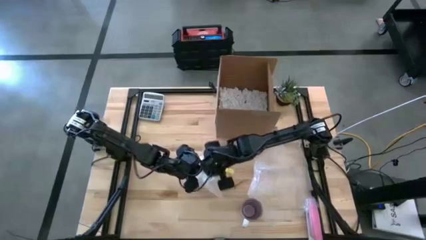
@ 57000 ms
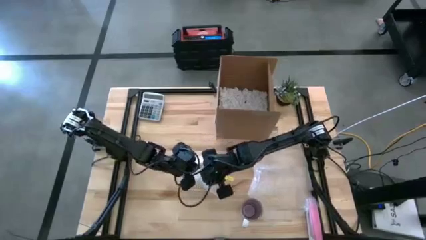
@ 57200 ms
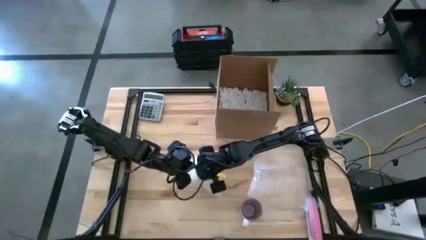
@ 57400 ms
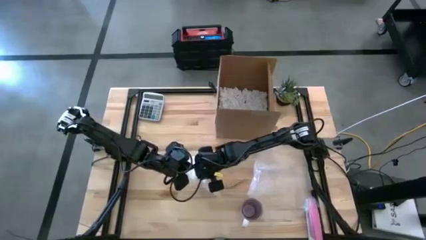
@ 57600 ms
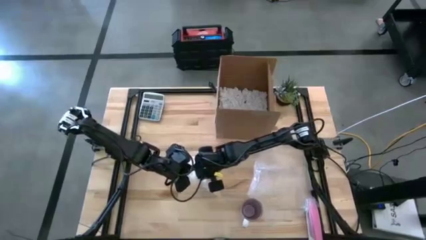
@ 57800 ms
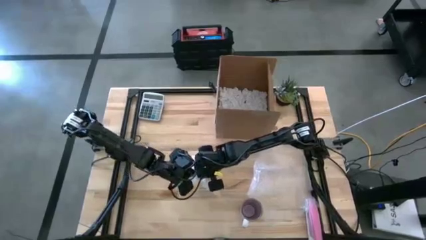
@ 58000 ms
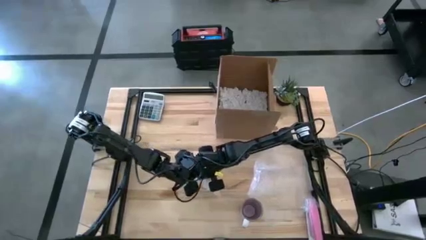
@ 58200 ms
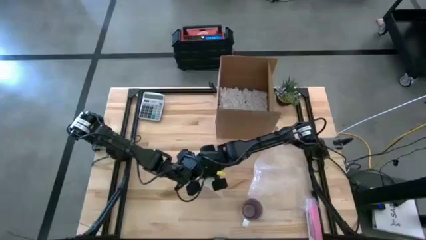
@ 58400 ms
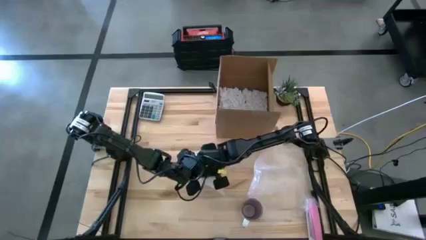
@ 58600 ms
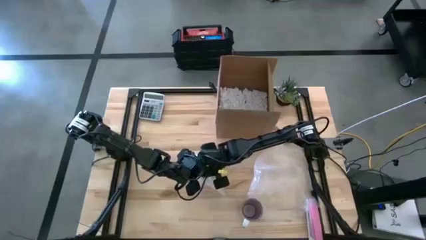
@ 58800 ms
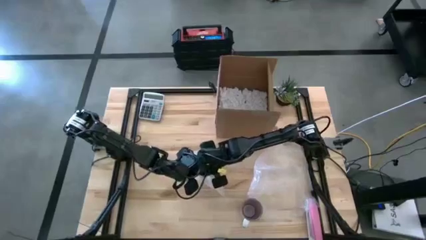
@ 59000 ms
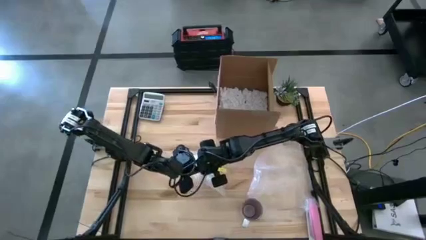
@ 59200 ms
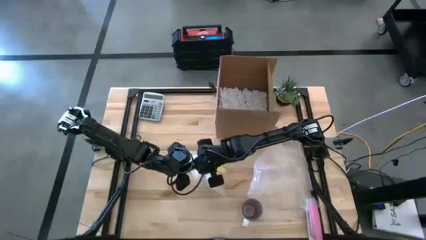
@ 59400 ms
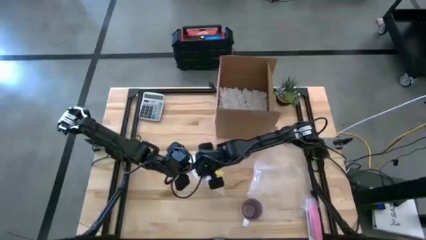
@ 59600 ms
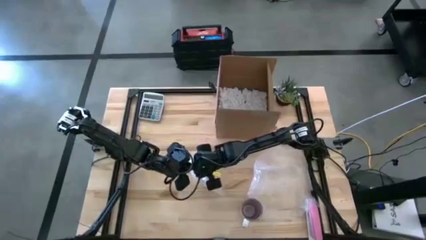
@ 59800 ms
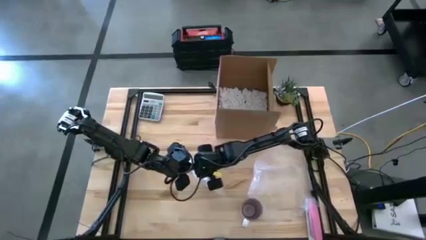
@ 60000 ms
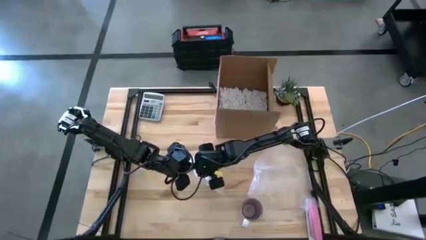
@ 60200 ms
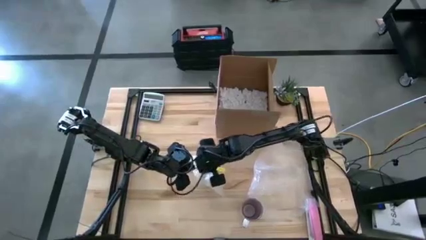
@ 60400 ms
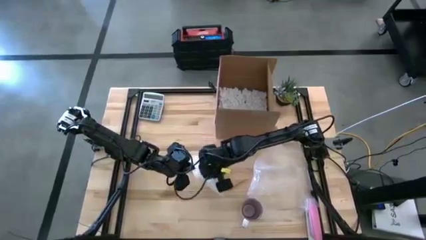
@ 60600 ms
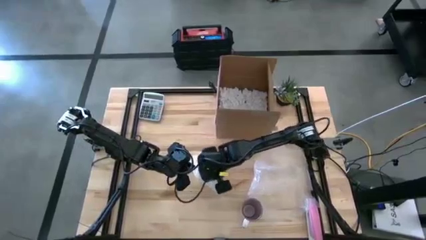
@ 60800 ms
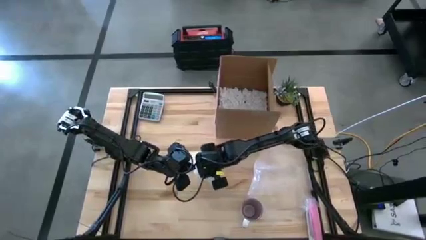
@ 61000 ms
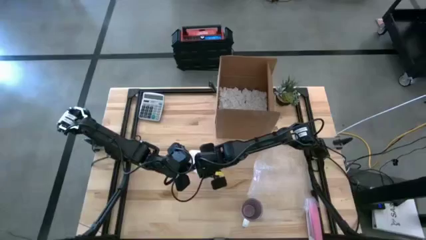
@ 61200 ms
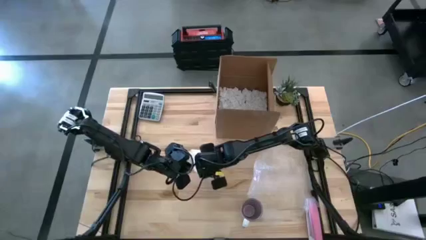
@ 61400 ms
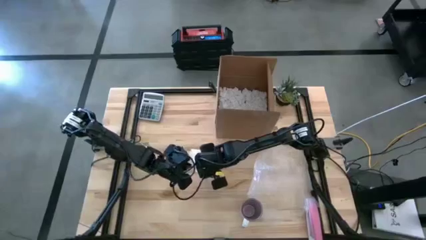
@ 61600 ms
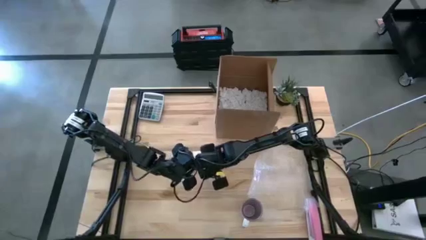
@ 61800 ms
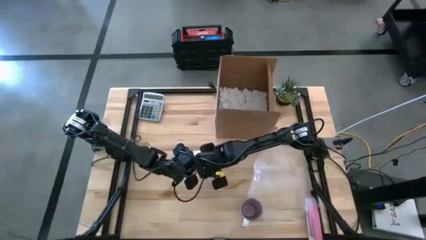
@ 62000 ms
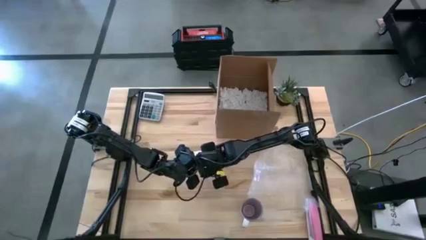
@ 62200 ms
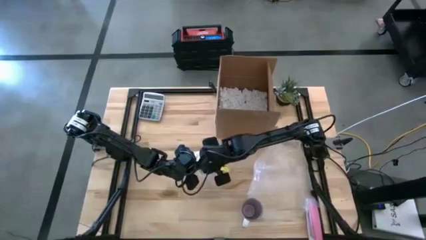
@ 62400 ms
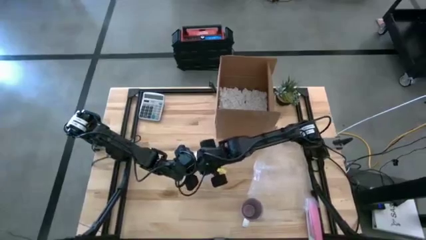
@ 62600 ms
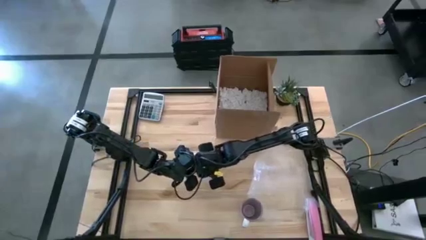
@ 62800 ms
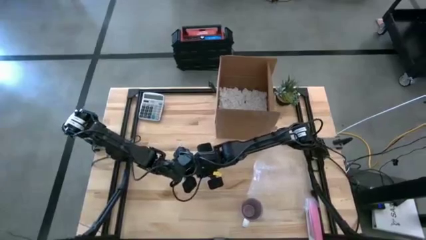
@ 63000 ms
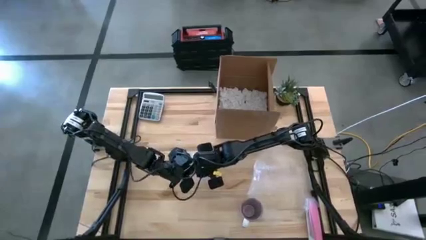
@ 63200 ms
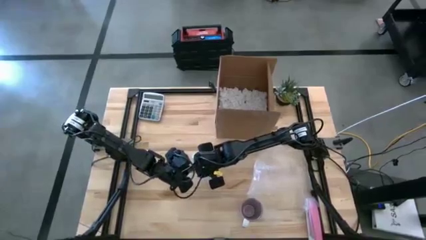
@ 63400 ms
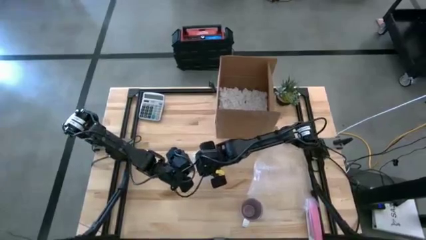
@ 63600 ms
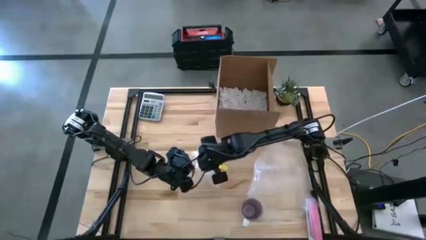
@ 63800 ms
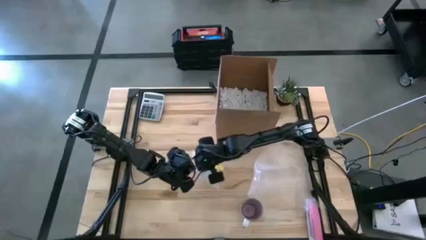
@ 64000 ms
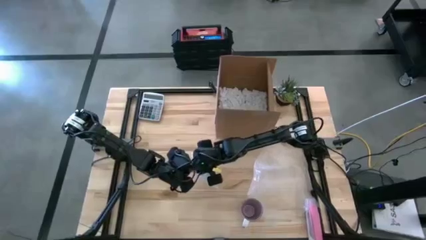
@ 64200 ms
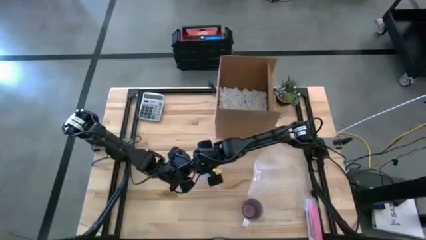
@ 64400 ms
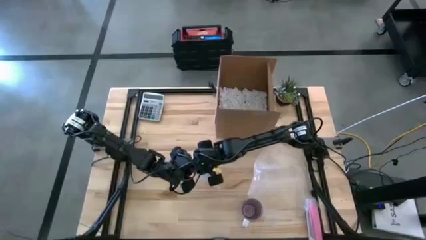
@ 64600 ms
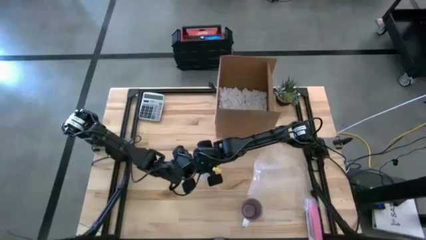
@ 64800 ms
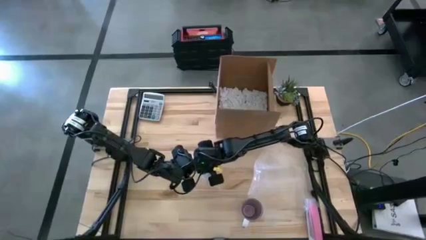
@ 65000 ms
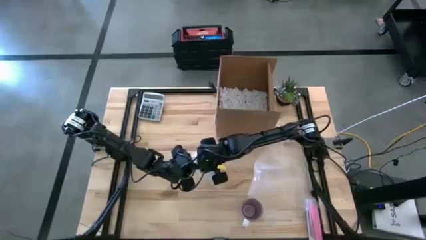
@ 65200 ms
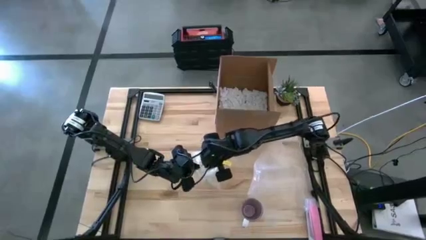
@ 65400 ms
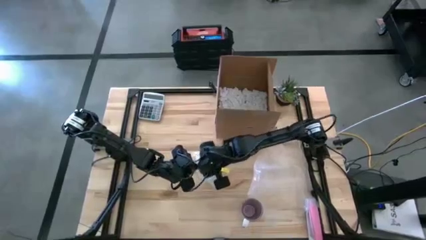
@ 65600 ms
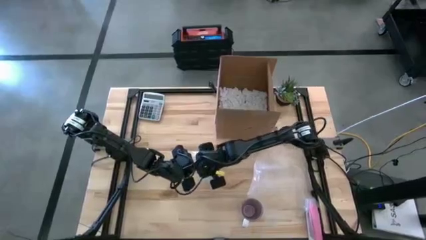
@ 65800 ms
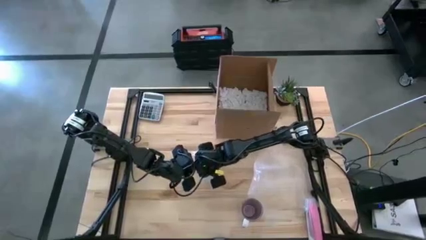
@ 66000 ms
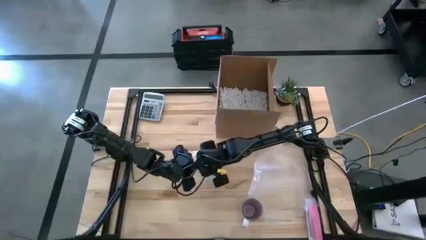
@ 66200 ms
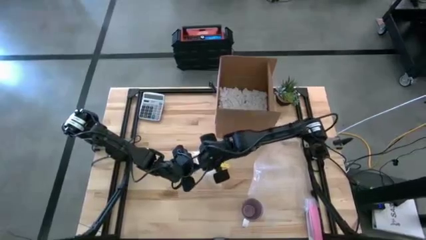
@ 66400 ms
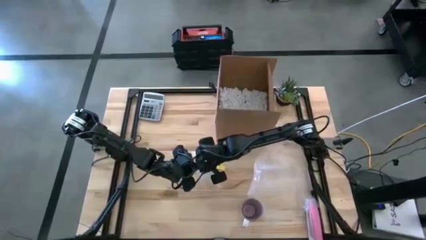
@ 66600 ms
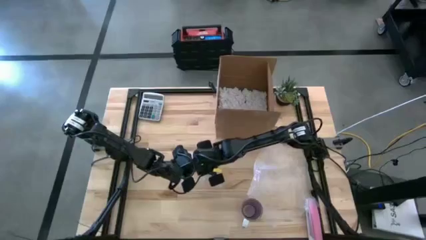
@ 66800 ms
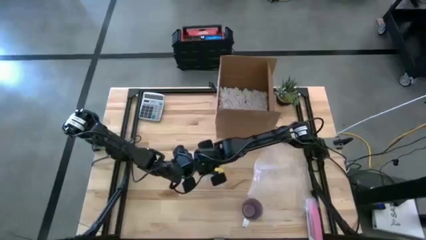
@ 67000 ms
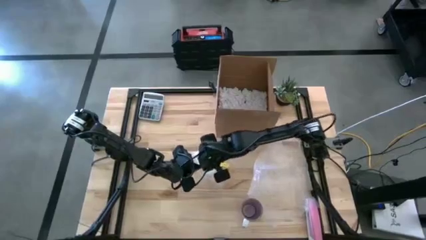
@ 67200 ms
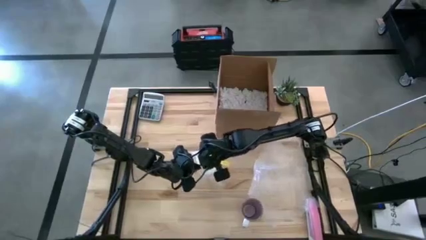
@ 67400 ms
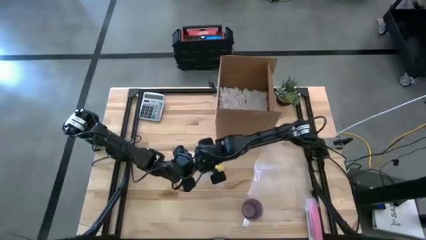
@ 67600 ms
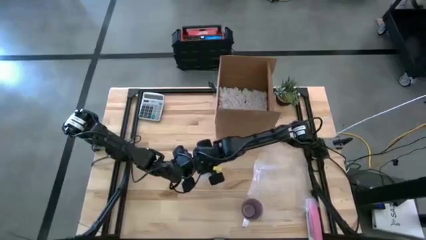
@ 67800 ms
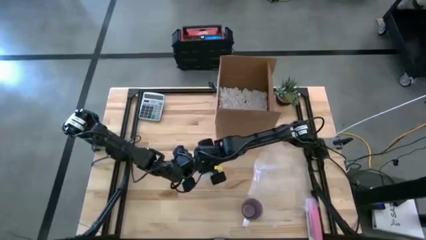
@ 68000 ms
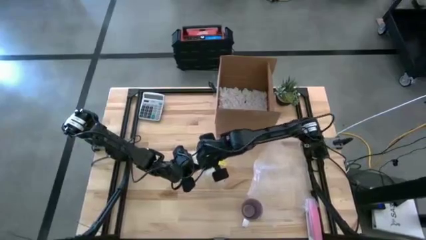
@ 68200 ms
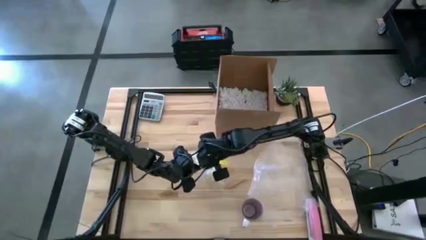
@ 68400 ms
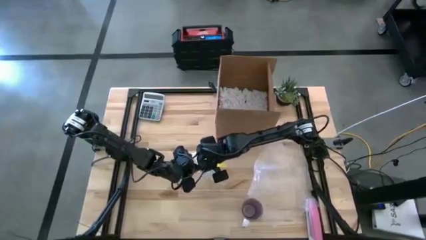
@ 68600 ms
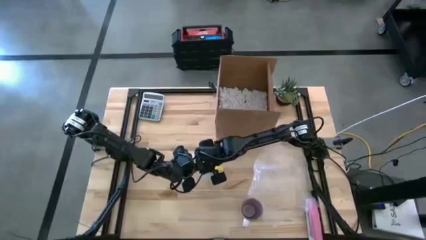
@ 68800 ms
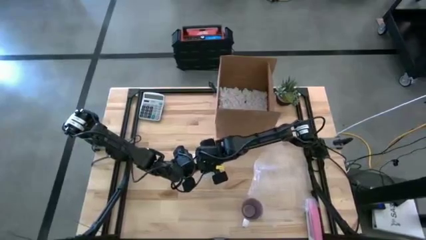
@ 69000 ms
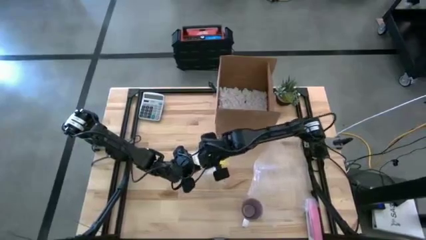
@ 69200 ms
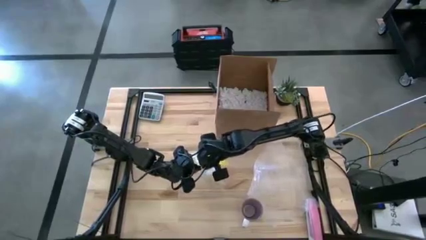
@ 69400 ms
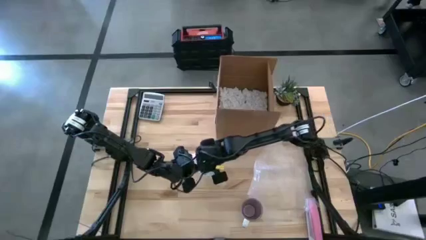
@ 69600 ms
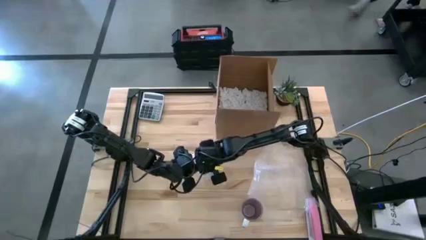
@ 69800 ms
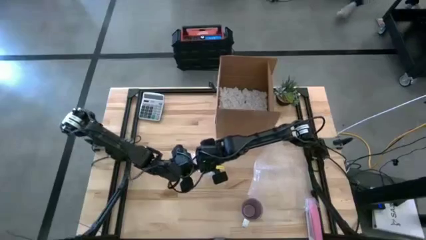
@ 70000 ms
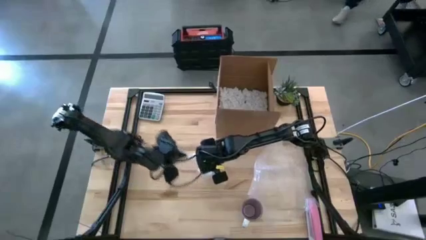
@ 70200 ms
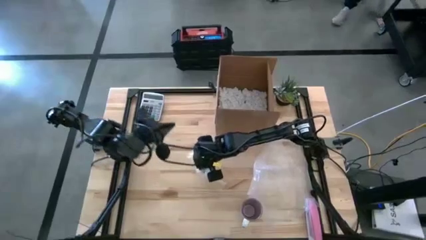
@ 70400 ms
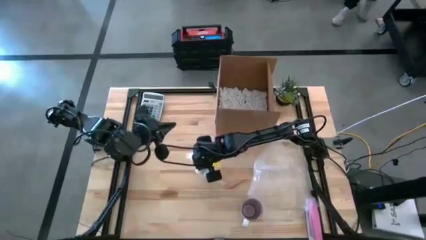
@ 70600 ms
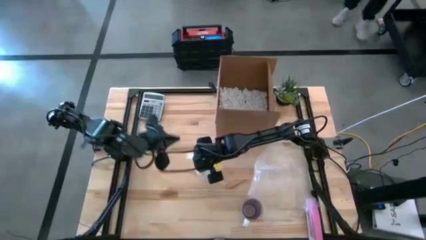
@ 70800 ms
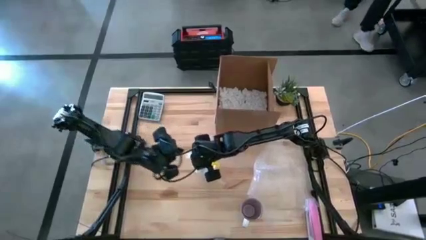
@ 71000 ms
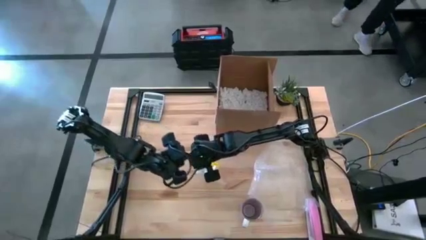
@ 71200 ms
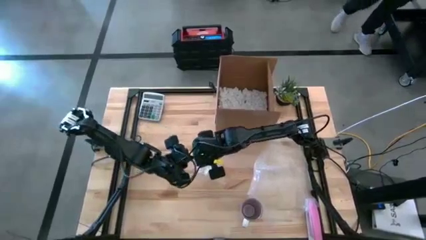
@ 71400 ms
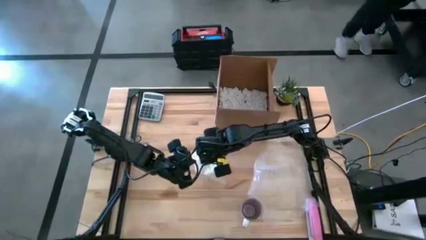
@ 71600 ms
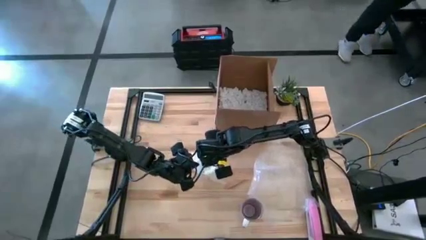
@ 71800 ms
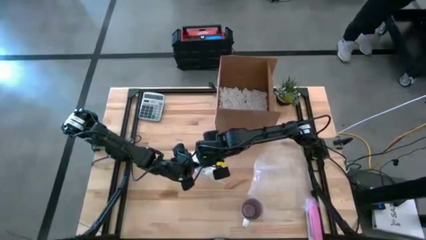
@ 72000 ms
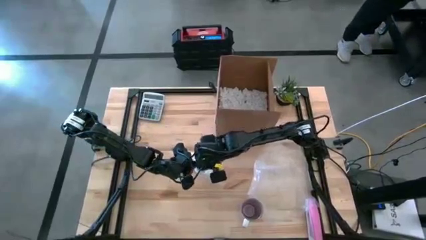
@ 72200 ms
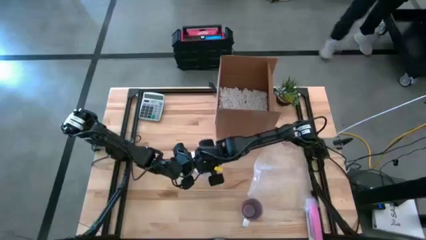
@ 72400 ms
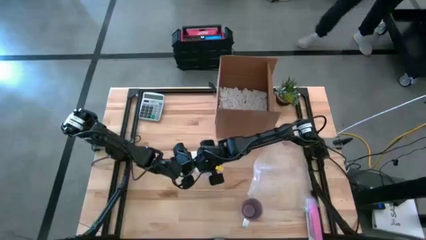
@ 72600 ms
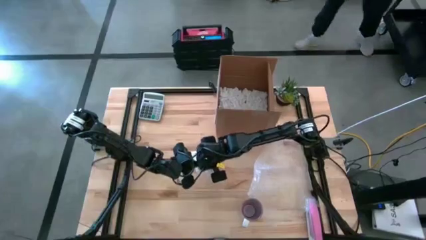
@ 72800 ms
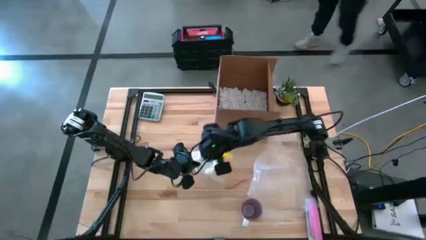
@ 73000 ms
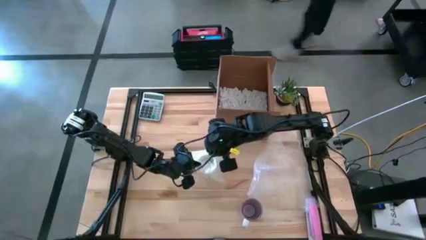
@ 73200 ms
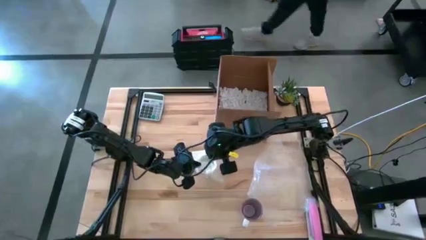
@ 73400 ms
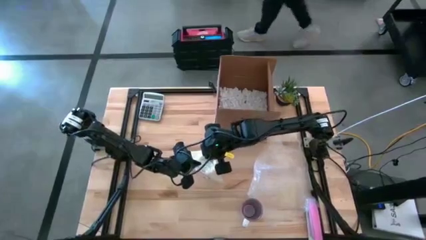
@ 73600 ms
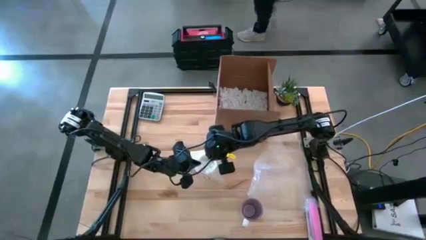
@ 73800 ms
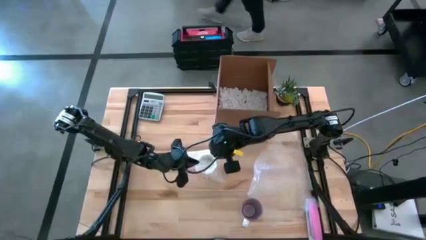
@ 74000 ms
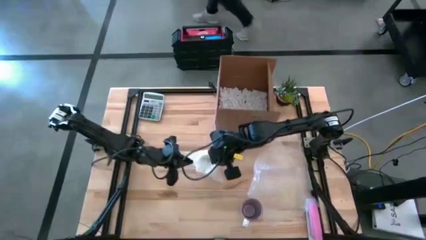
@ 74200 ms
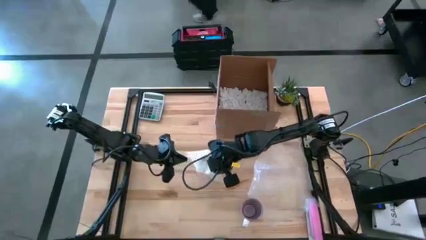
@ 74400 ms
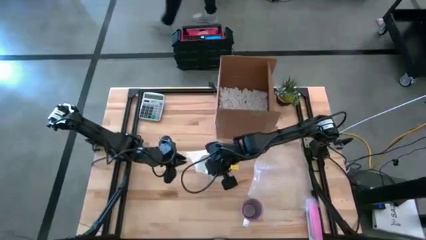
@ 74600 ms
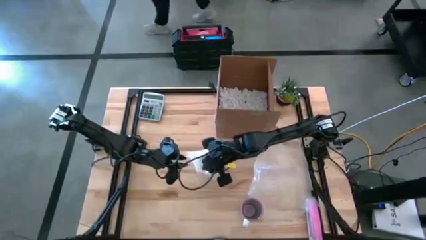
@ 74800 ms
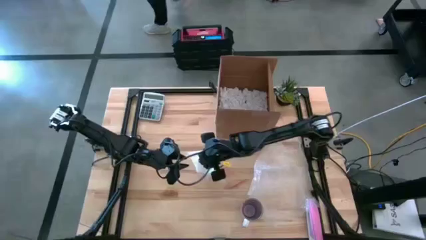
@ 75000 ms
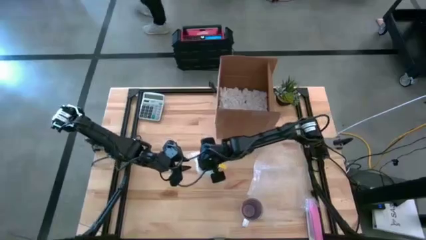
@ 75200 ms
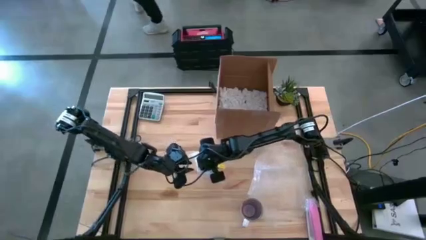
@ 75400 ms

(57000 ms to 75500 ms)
Task: wrap mug
Wrap the orange patterned mug with the left transparent bubble wrap
